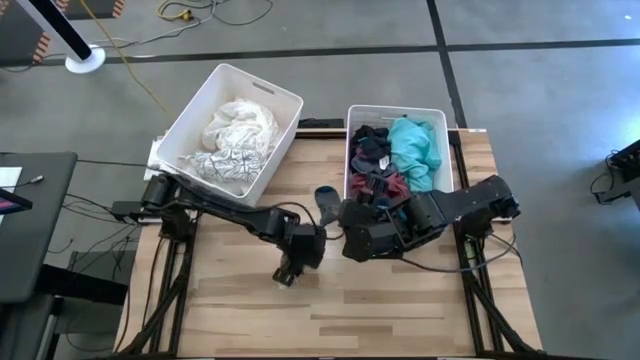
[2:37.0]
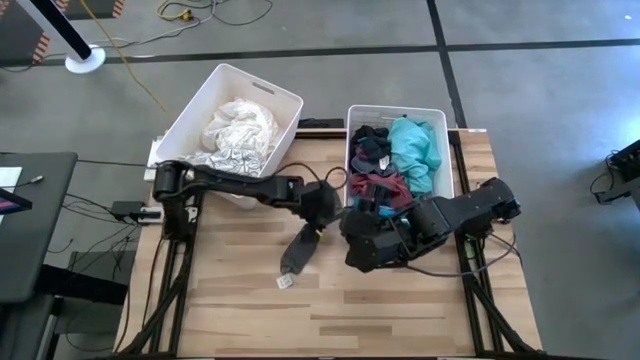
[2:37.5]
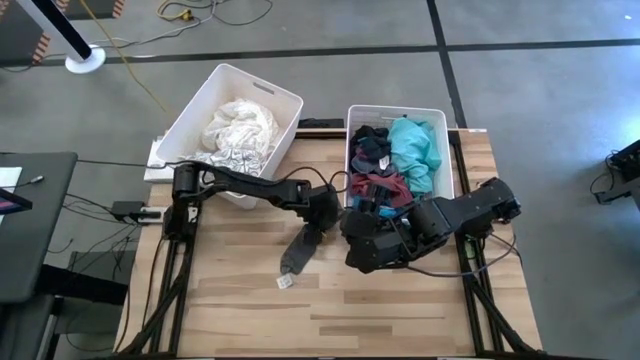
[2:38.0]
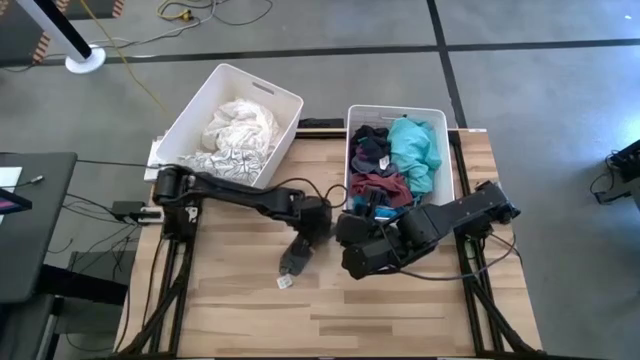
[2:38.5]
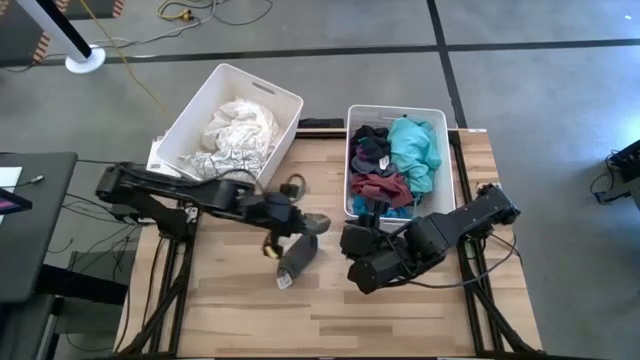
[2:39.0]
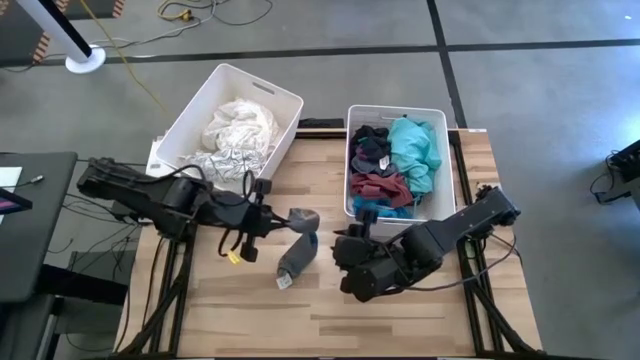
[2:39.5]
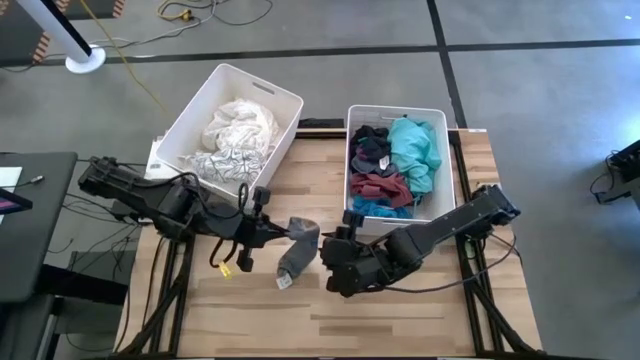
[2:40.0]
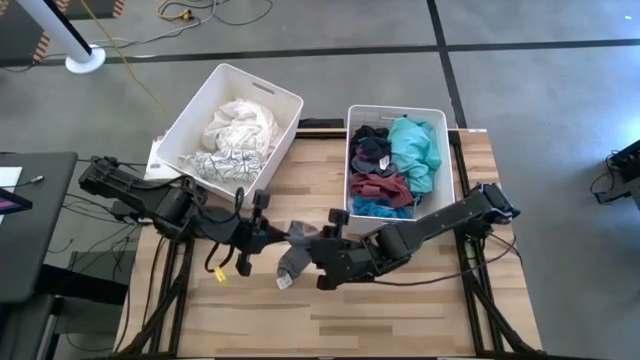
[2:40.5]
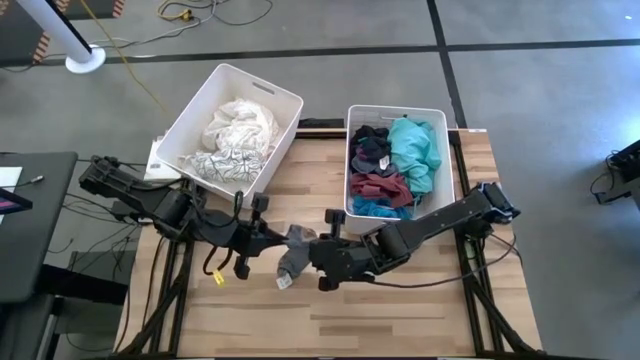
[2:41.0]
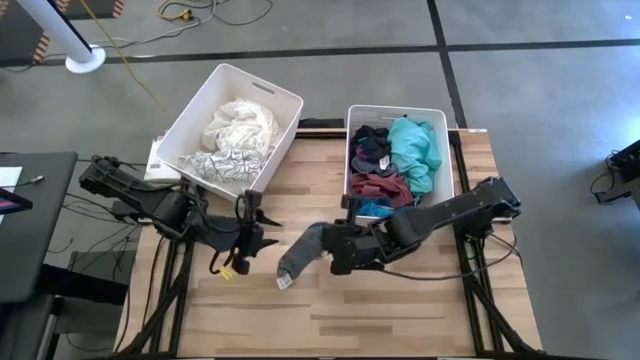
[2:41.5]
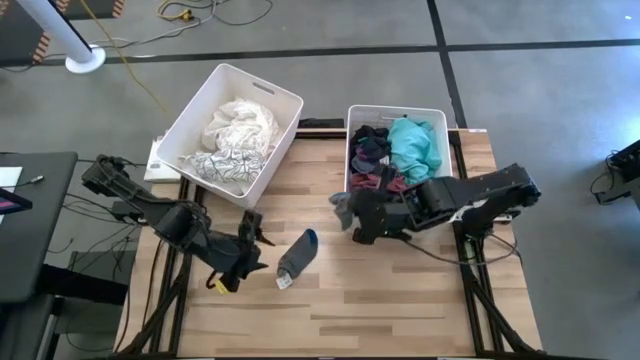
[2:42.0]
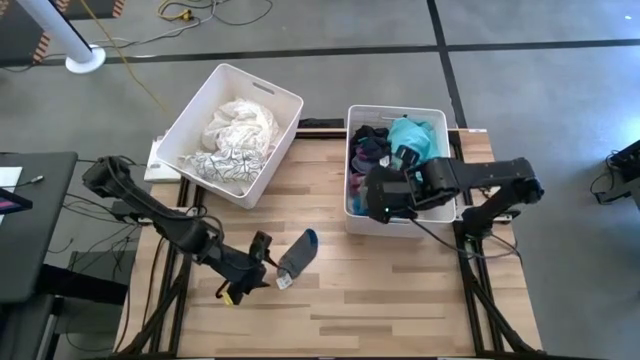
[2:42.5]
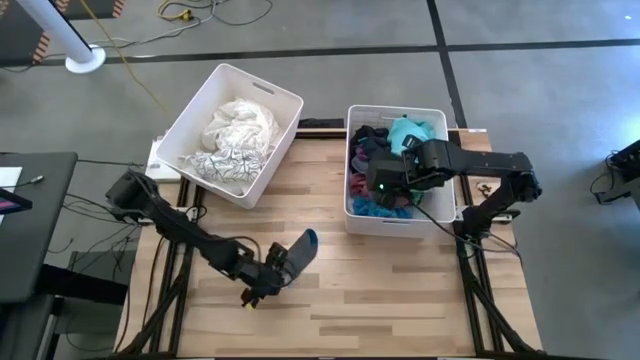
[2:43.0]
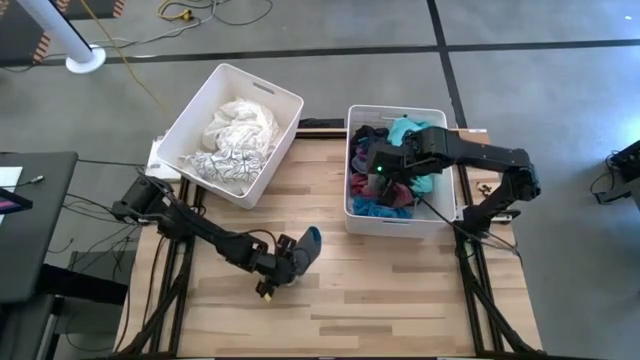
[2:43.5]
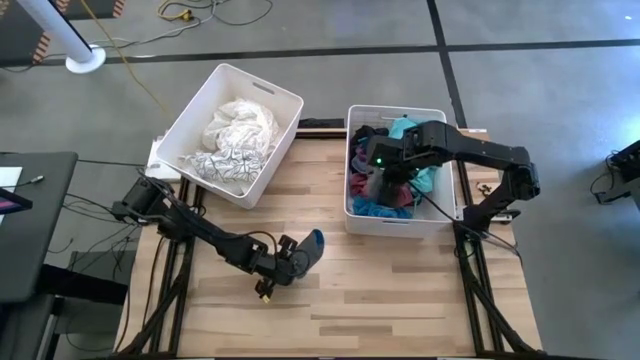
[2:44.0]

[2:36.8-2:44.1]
Task: Sort clothes
Put the top gray sock into the right white laundry bin

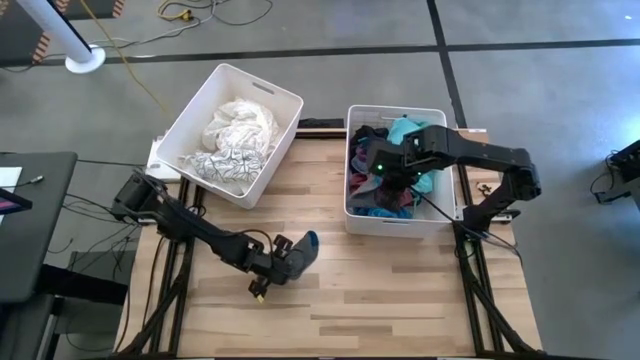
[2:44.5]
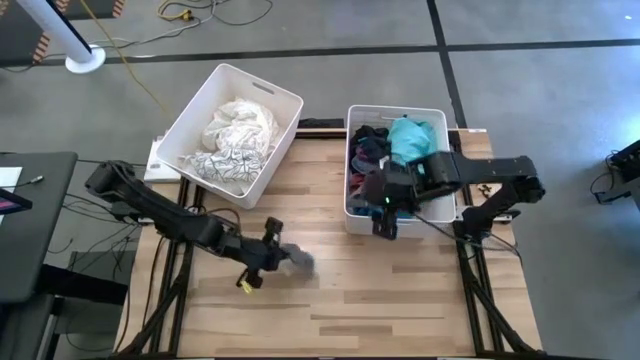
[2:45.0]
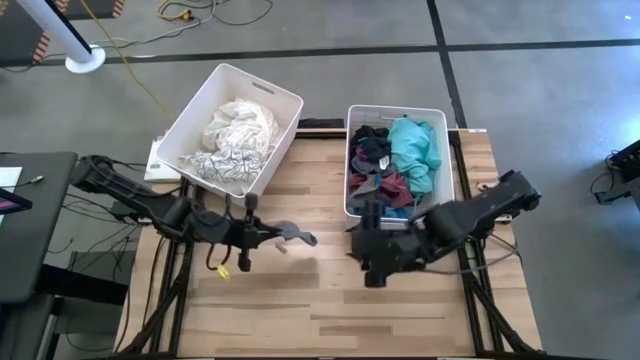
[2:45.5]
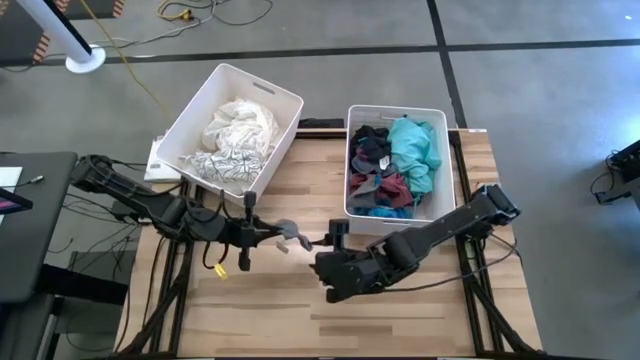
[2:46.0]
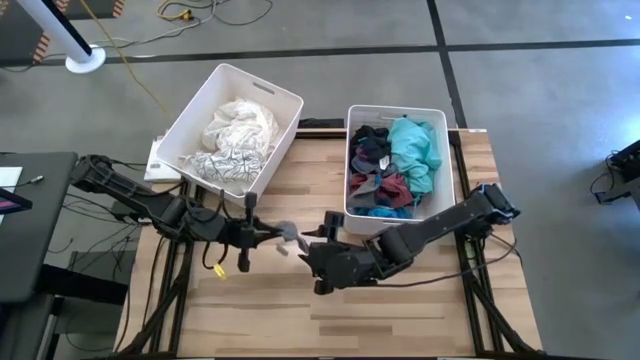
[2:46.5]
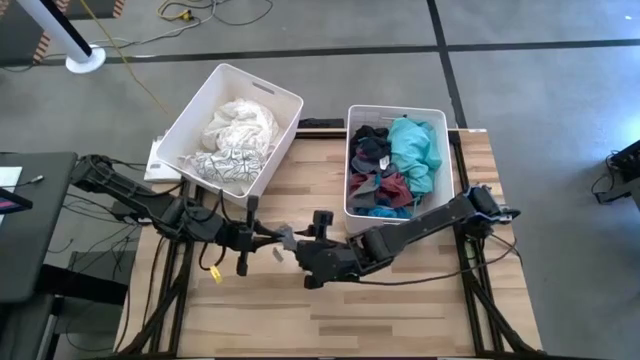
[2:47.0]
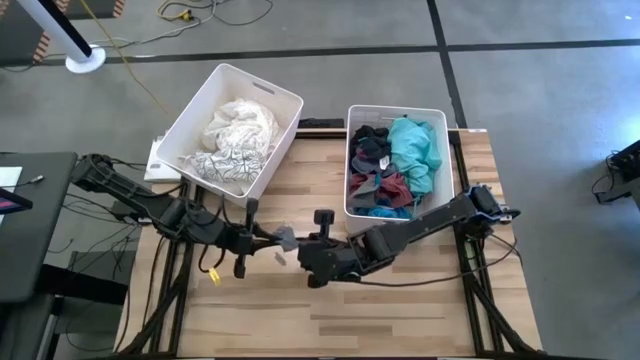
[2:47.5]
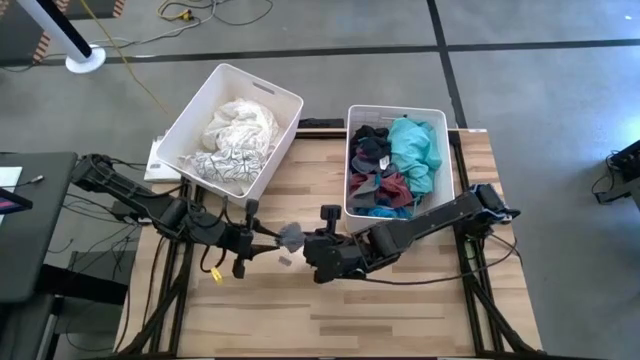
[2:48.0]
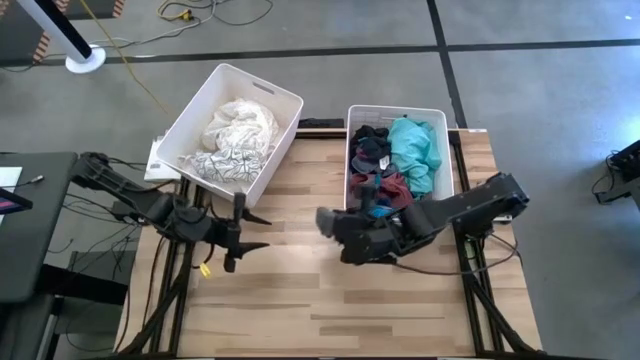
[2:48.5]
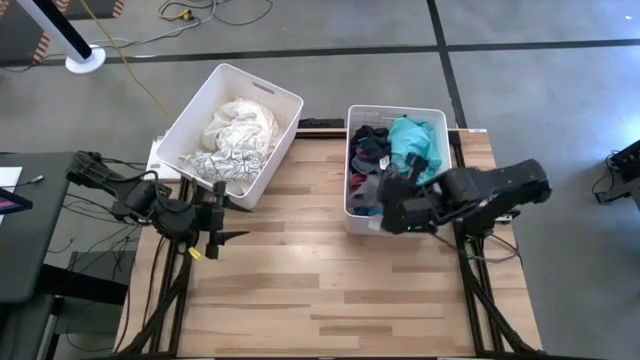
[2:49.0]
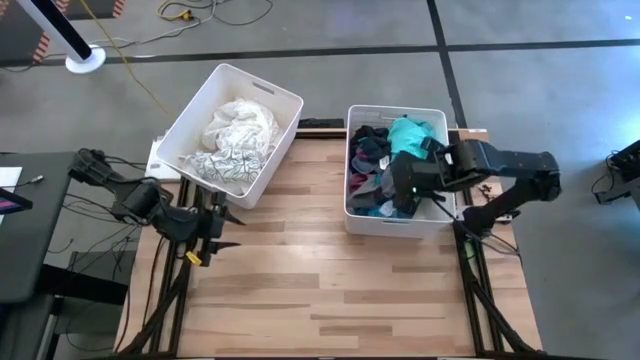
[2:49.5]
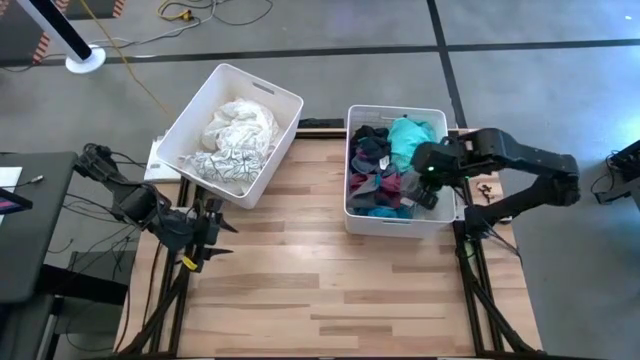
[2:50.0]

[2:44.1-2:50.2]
Put the gray sock into the right white laundry bin

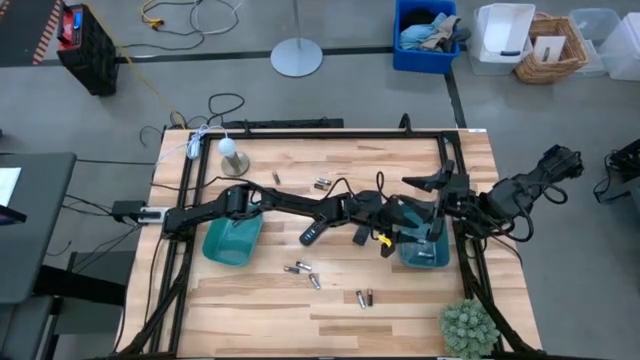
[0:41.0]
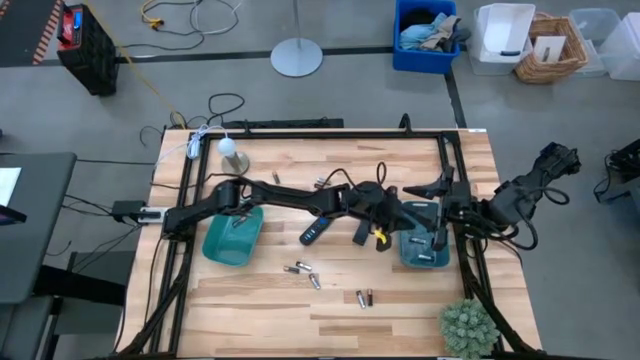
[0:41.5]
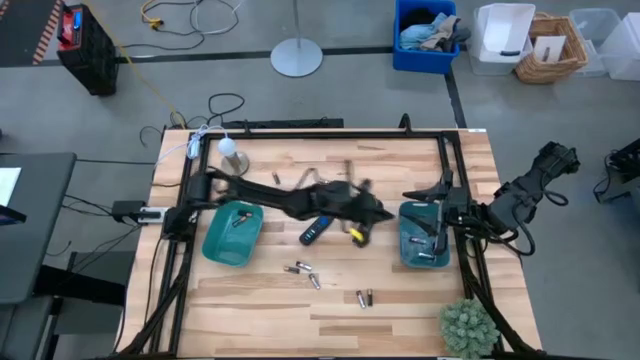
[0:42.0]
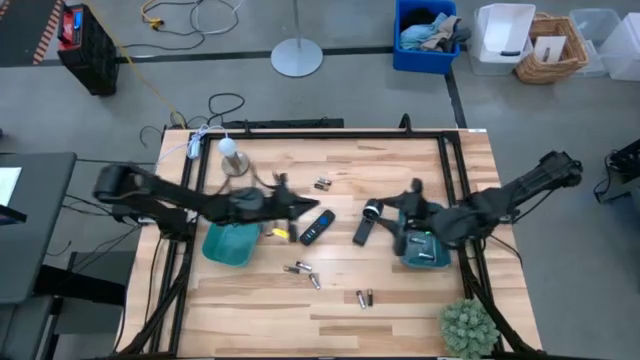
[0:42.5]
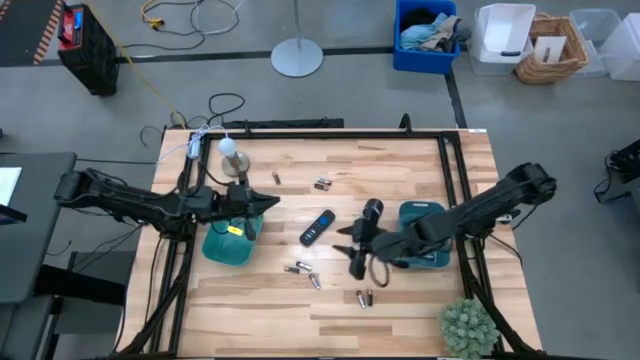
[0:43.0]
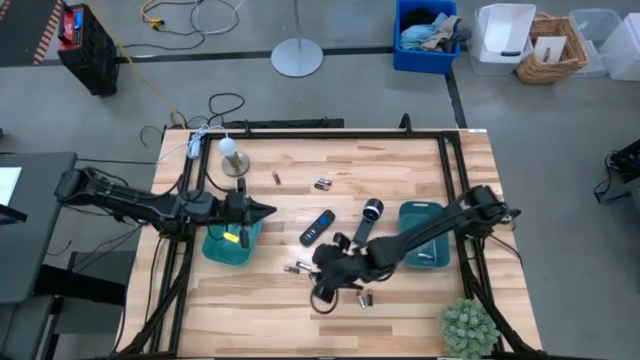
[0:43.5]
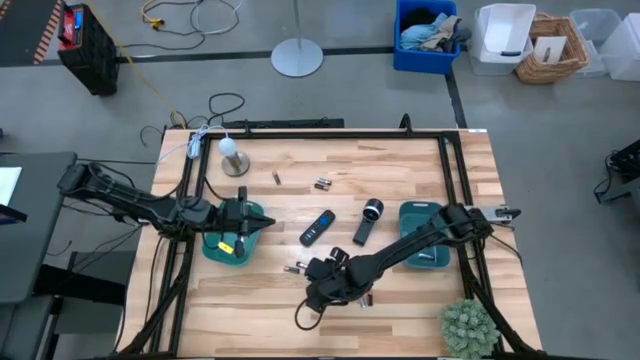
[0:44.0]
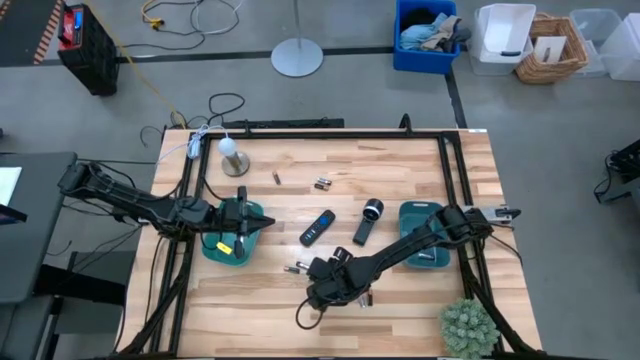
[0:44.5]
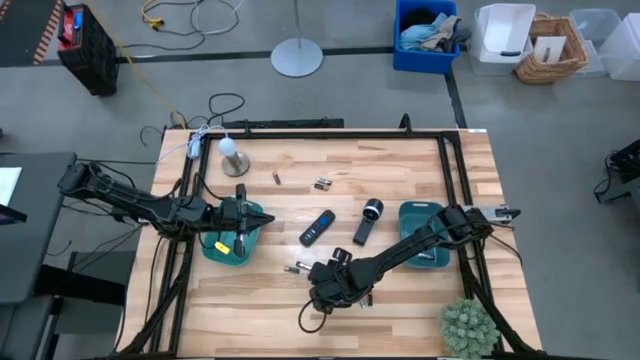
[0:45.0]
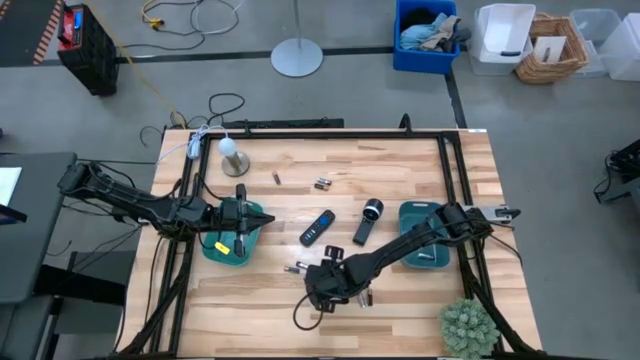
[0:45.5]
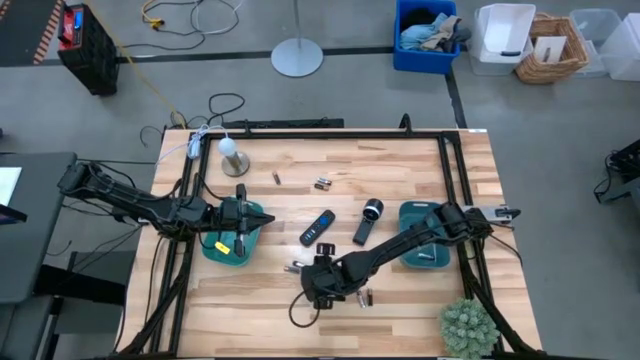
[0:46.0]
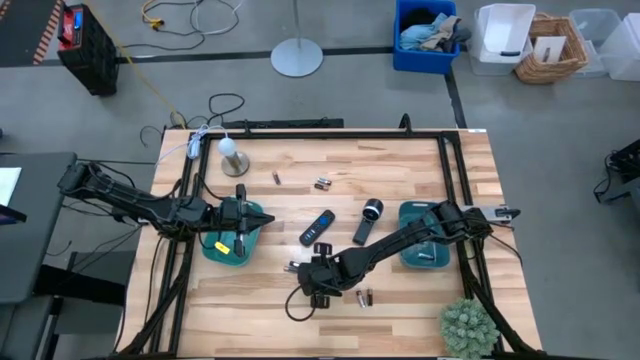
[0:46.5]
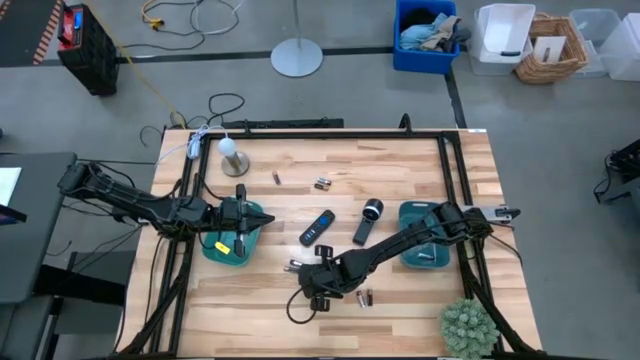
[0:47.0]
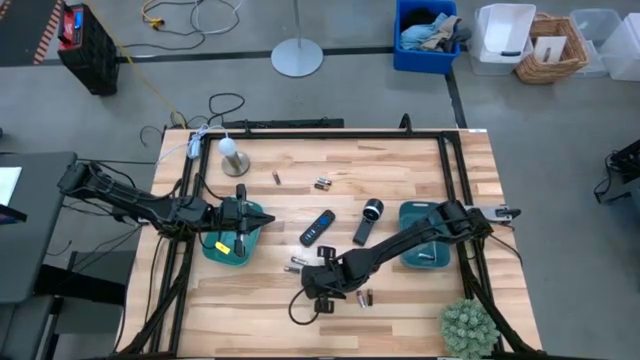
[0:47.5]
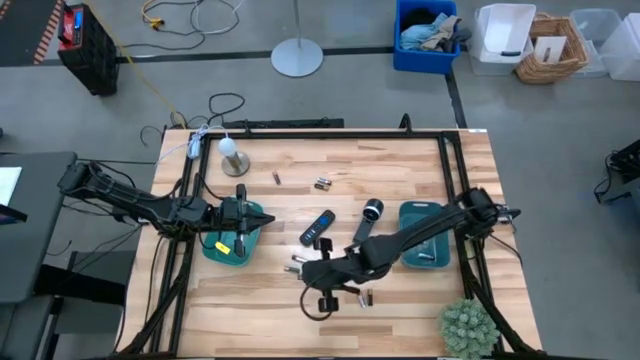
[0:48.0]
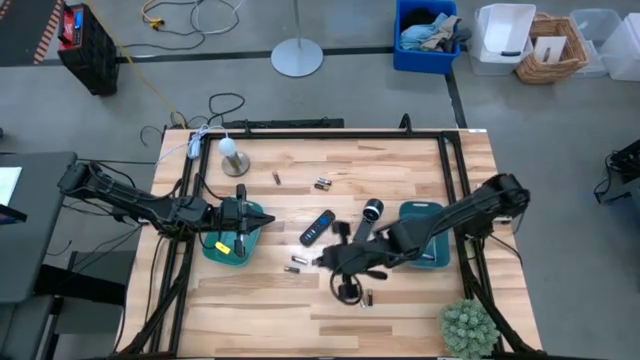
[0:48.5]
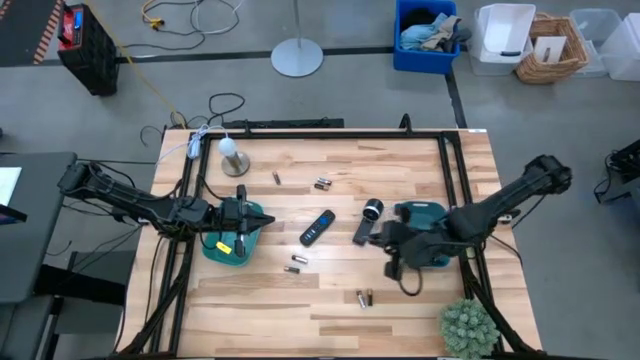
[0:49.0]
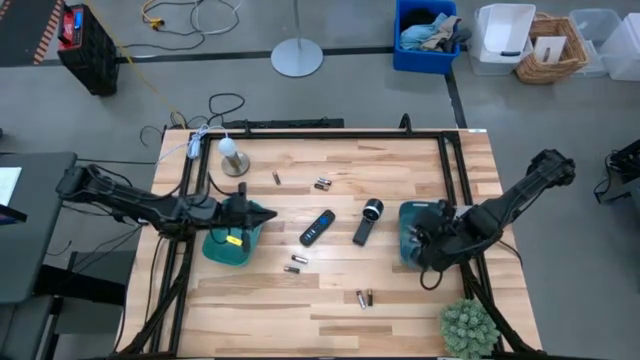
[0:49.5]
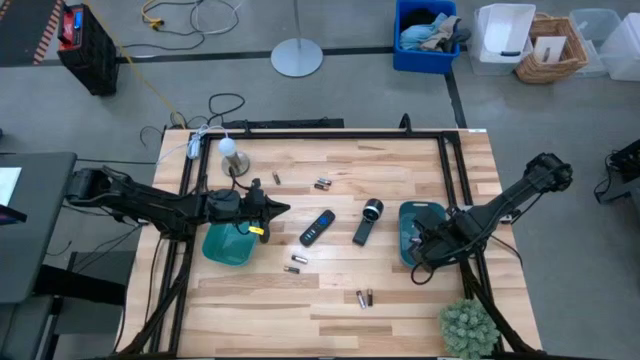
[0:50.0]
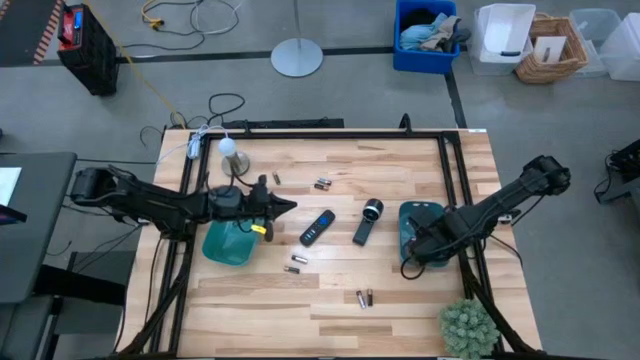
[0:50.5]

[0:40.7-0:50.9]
Task: Sort batteries
Put the silver battery into the blue bin
